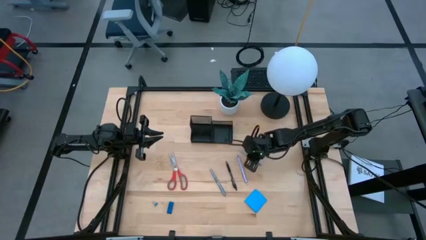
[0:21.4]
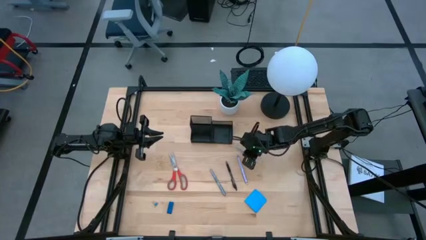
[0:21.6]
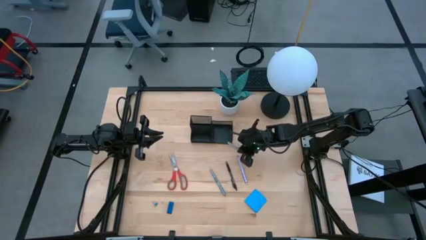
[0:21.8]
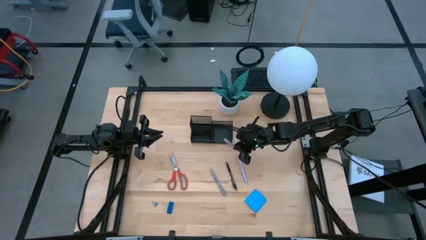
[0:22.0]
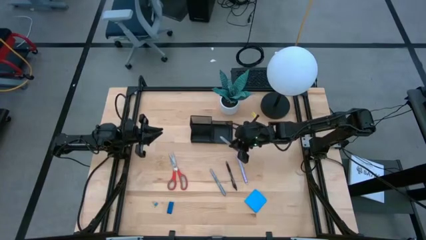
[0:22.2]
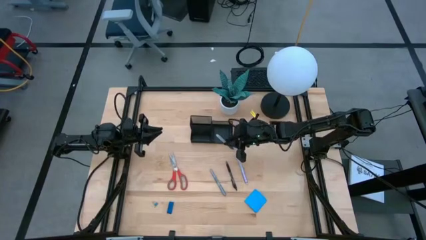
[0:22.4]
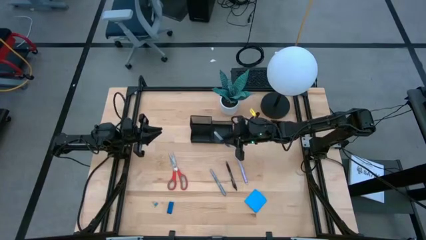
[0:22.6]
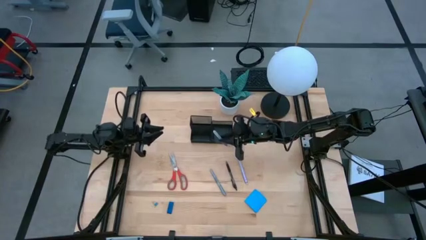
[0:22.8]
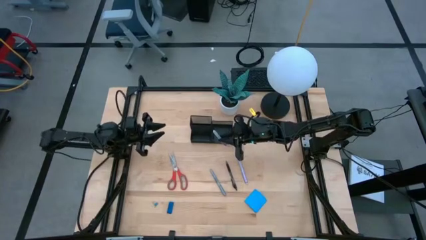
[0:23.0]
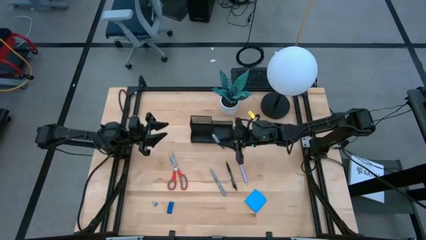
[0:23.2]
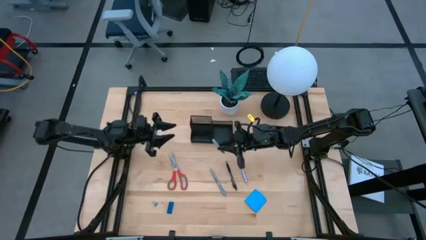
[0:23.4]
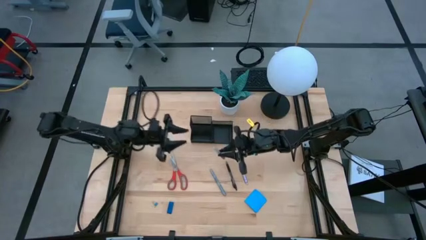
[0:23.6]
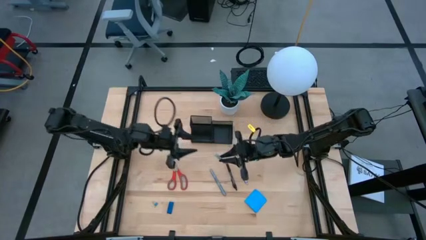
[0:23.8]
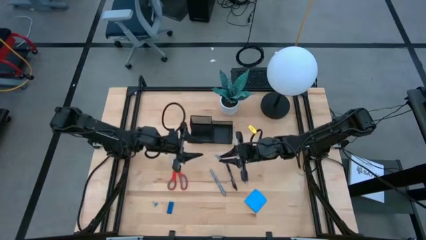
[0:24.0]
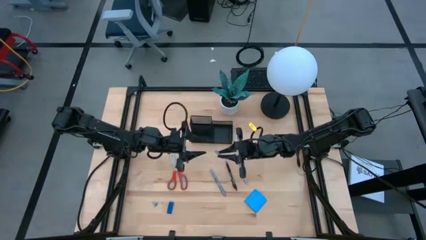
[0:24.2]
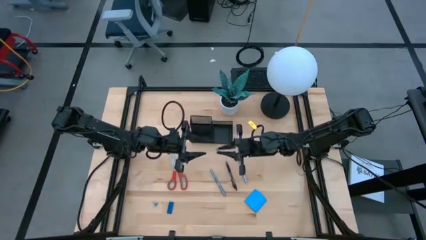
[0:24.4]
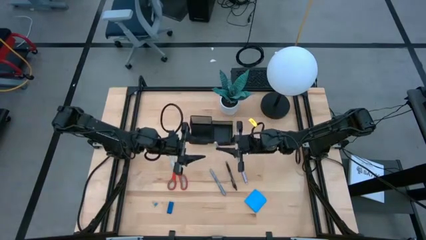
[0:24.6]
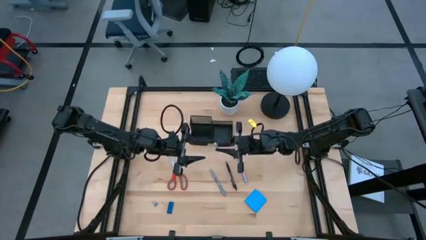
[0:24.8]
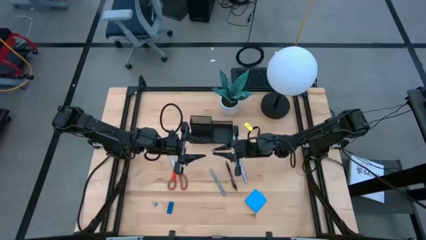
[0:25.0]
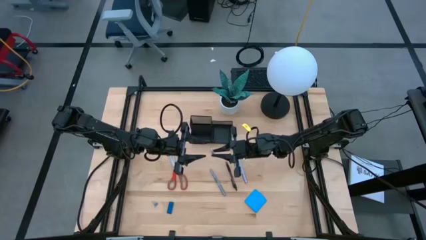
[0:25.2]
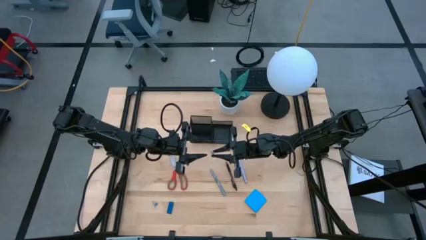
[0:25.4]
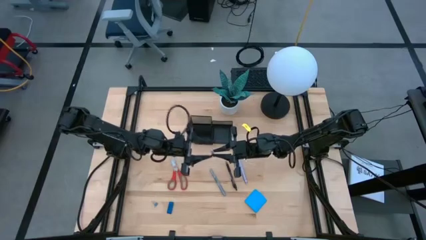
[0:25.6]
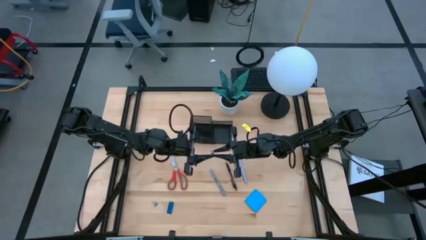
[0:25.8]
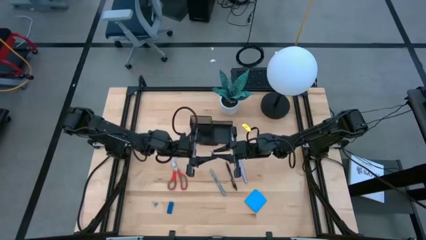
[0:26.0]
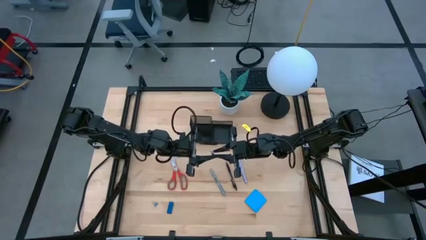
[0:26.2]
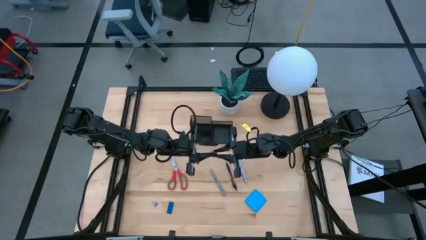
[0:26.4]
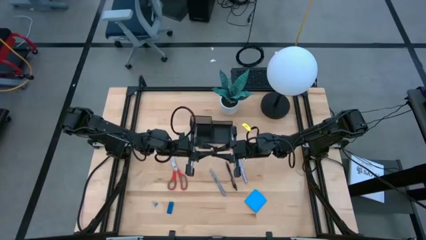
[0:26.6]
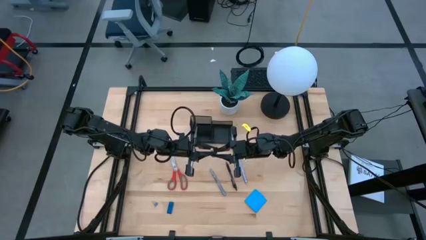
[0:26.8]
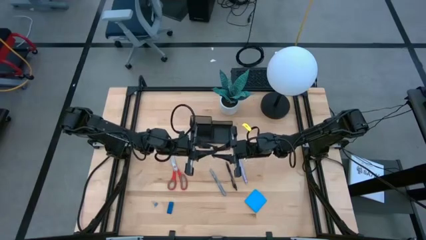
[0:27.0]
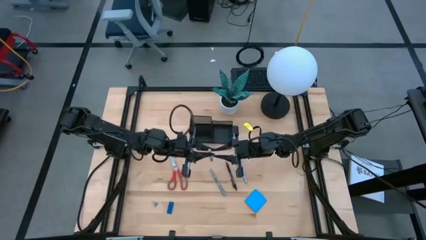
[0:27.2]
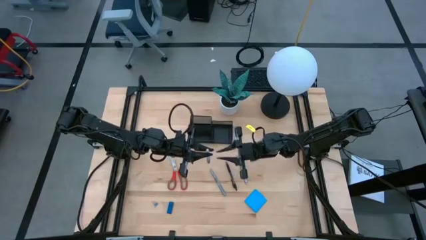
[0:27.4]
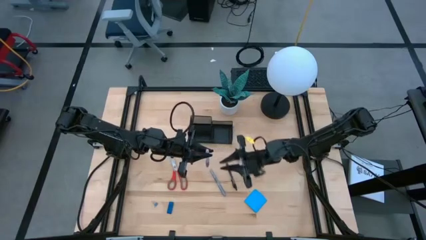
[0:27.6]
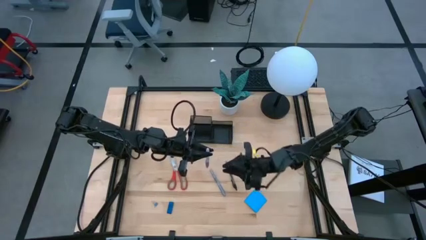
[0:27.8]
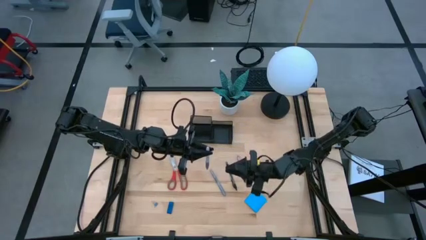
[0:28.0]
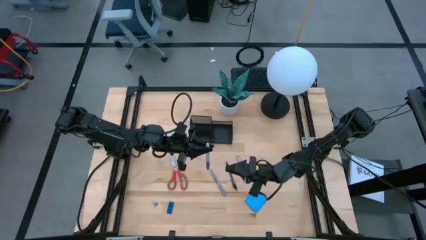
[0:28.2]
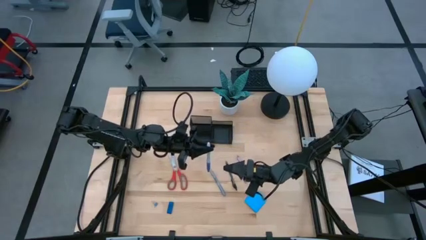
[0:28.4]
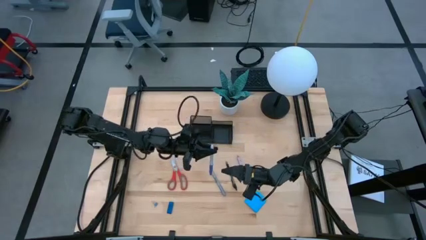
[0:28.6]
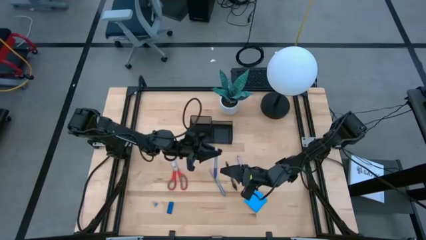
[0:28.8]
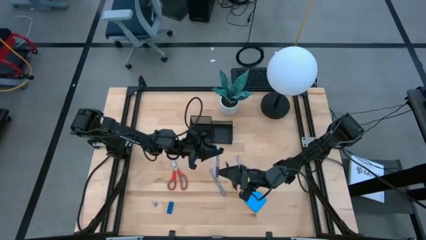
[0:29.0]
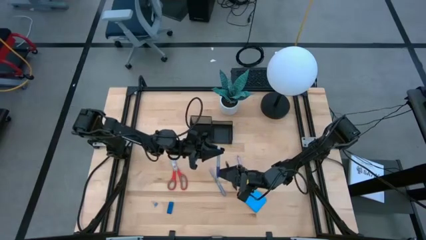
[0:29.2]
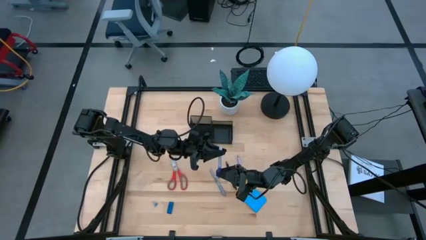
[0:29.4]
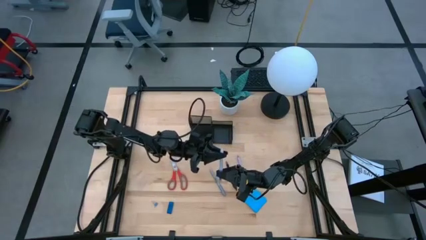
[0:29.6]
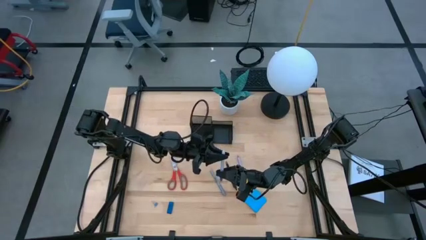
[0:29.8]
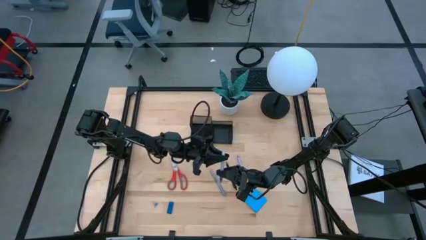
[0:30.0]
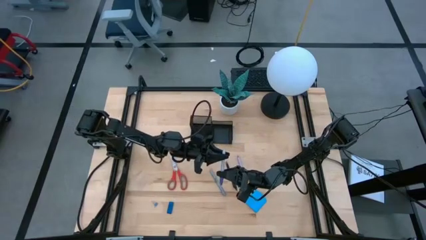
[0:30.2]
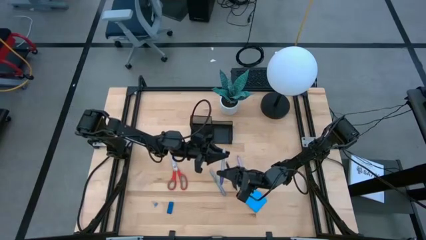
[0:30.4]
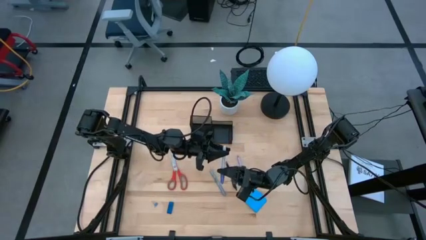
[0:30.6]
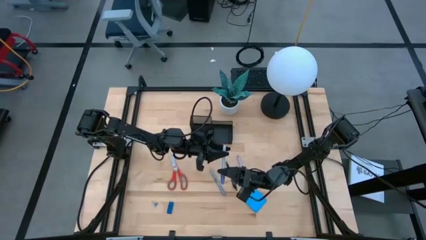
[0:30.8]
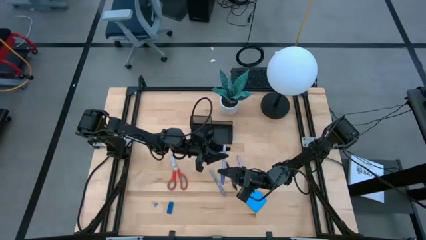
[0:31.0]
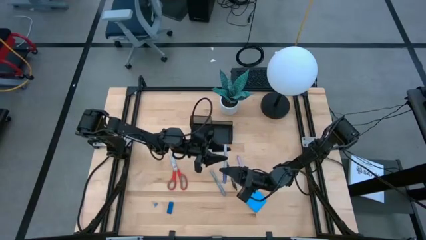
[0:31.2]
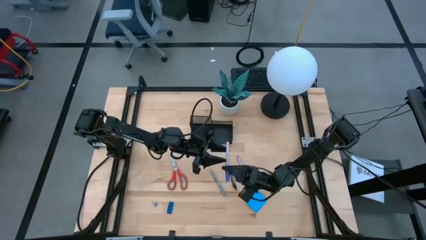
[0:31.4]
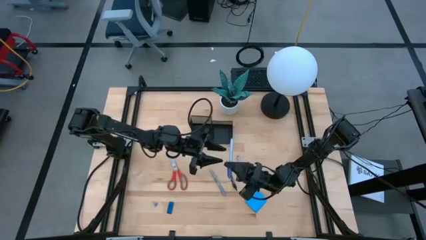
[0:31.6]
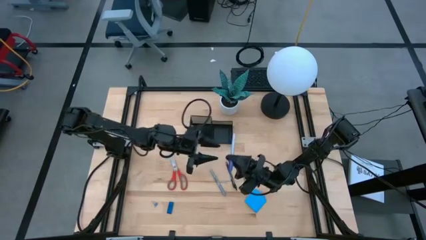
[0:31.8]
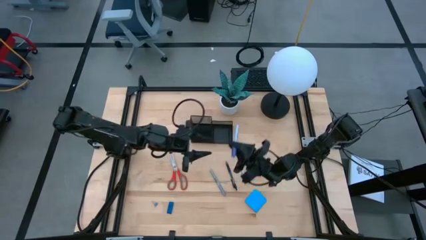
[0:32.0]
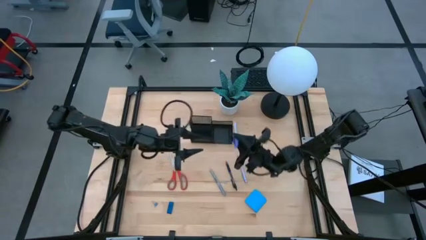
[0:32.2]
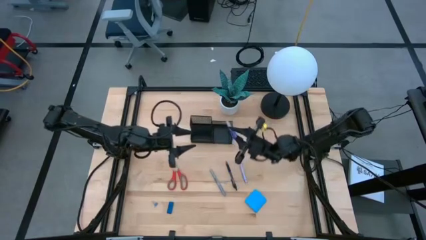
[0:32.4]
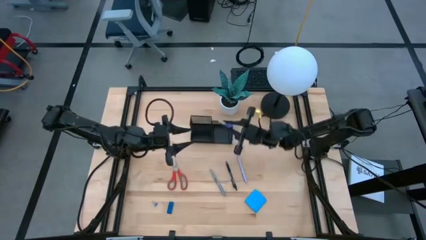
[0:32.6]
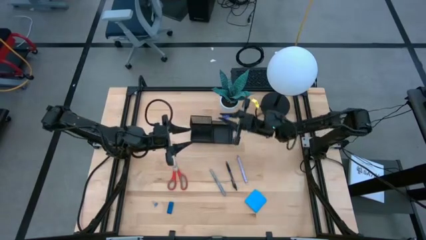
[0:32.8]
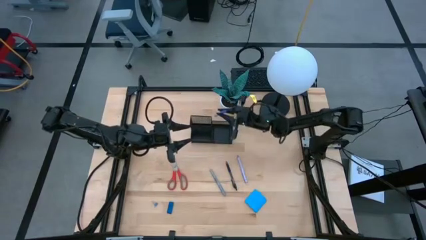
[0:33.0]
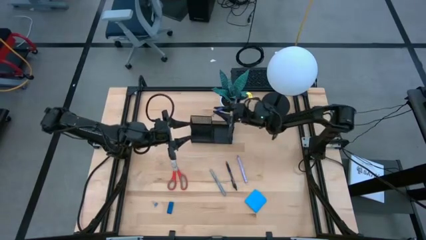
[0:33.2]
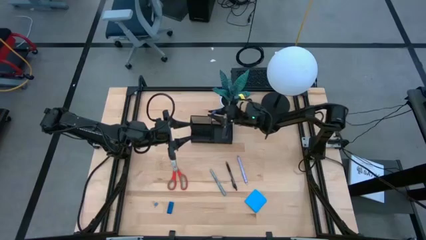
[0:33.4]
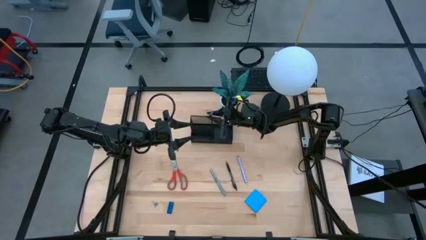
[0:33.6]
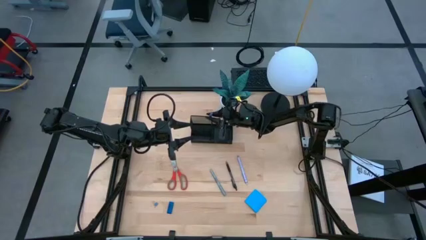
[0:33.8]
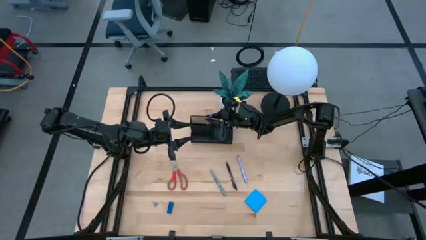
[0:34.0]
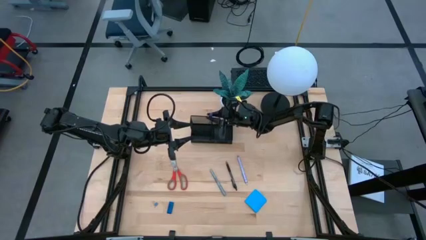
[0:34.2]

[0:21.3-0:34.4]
Task: Pick and place office supplies into organizer
Put the blue marker into the black desk organizer
